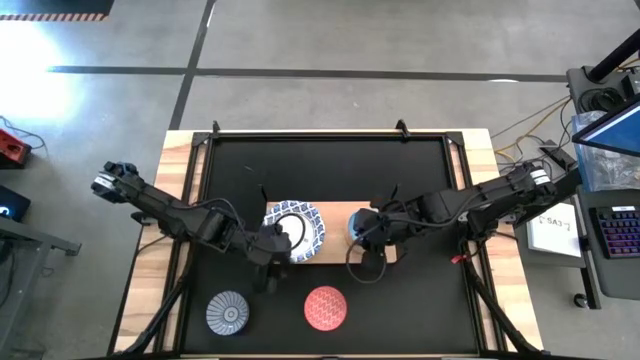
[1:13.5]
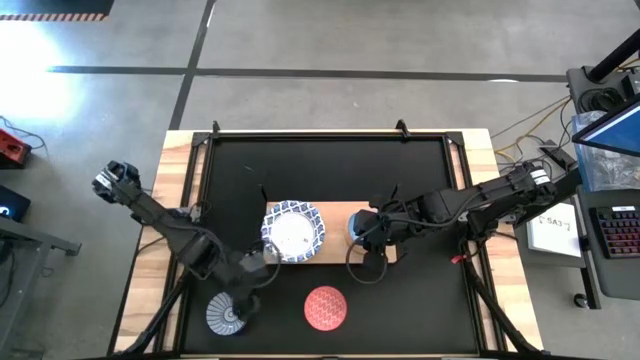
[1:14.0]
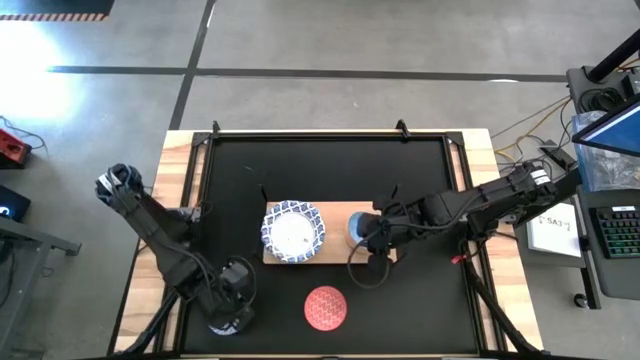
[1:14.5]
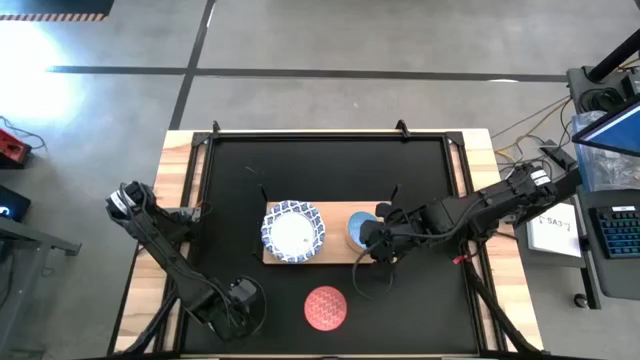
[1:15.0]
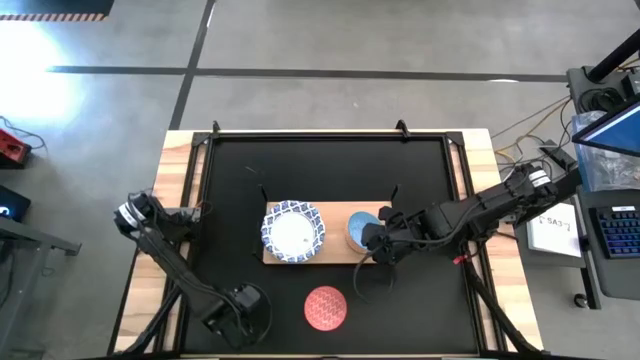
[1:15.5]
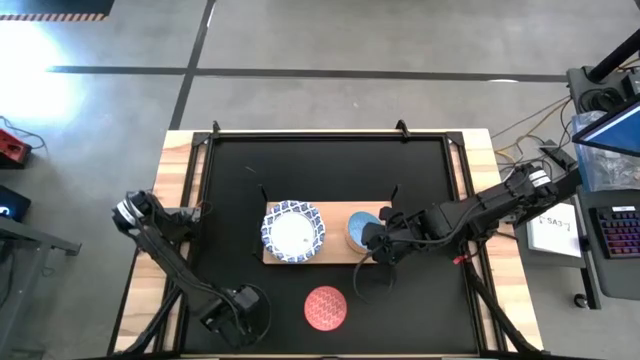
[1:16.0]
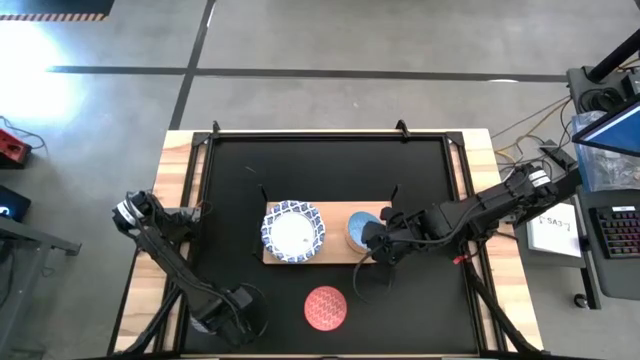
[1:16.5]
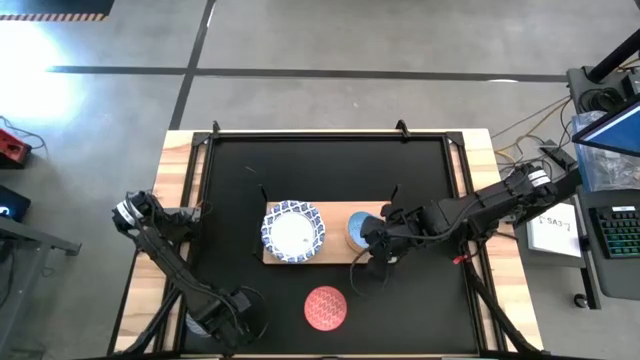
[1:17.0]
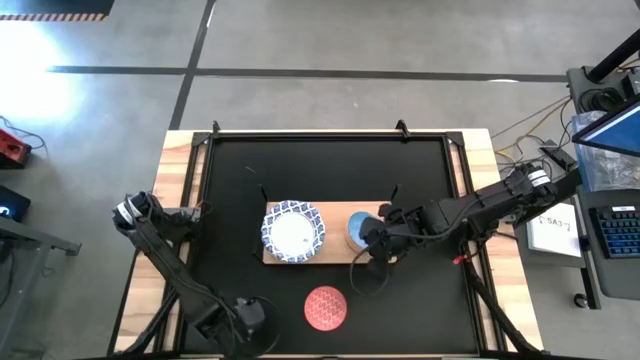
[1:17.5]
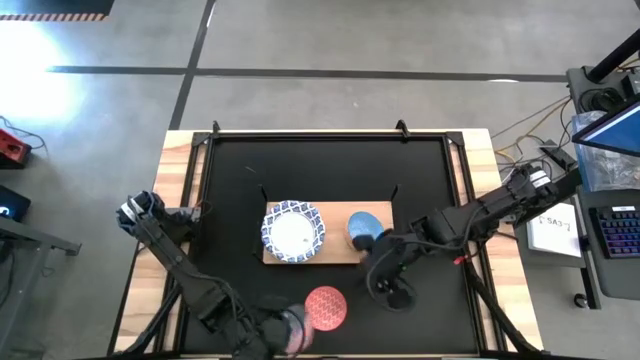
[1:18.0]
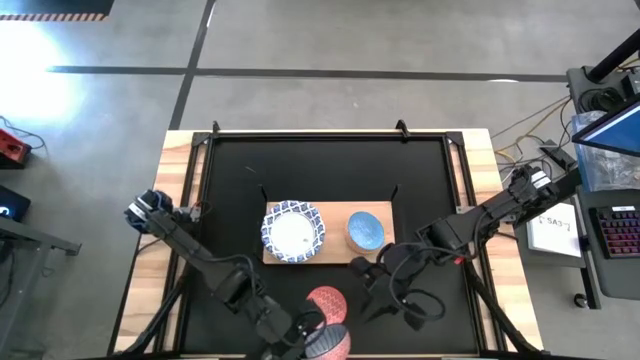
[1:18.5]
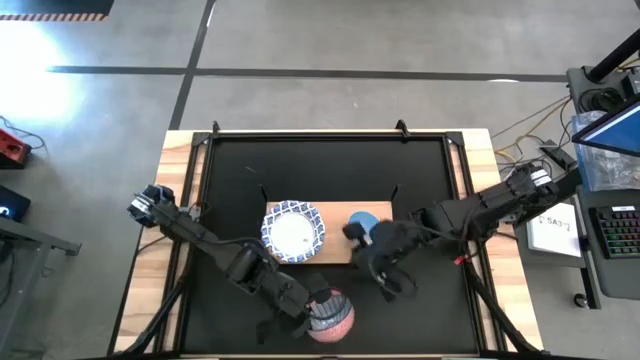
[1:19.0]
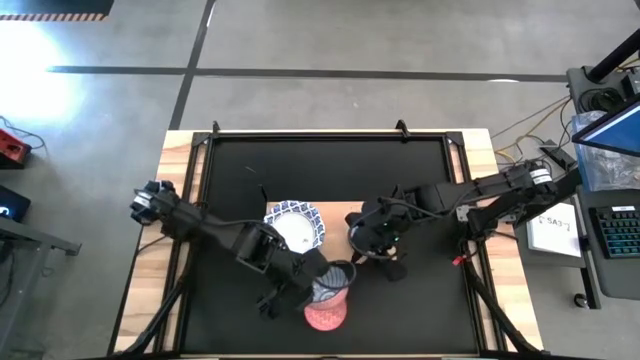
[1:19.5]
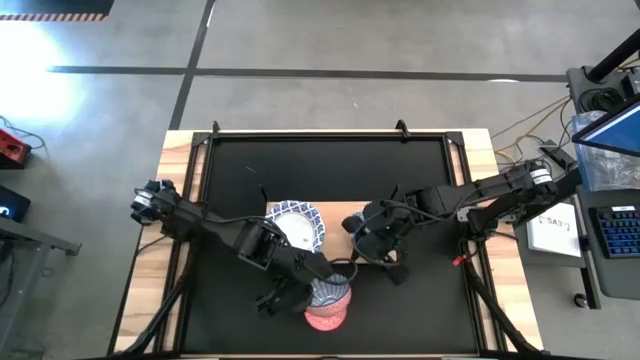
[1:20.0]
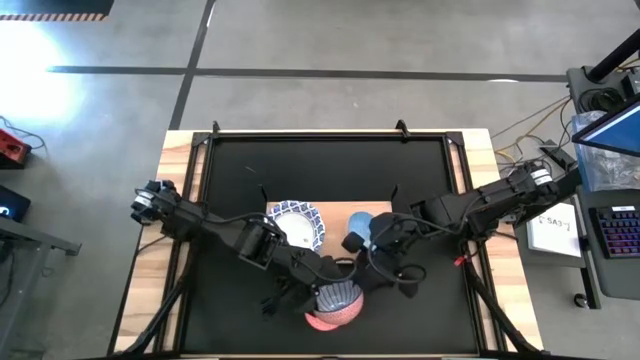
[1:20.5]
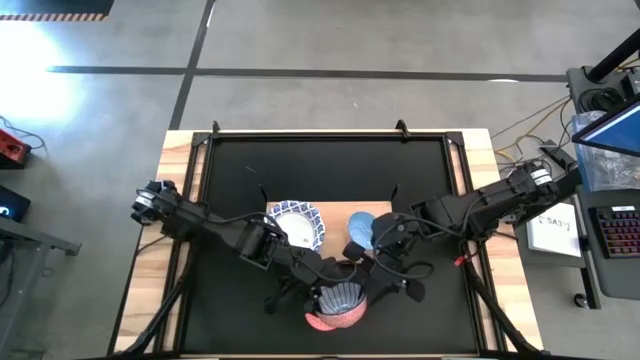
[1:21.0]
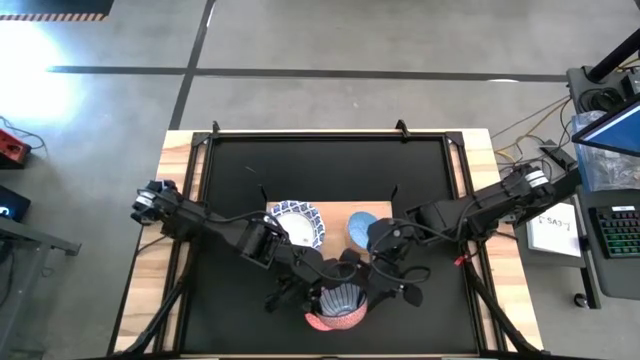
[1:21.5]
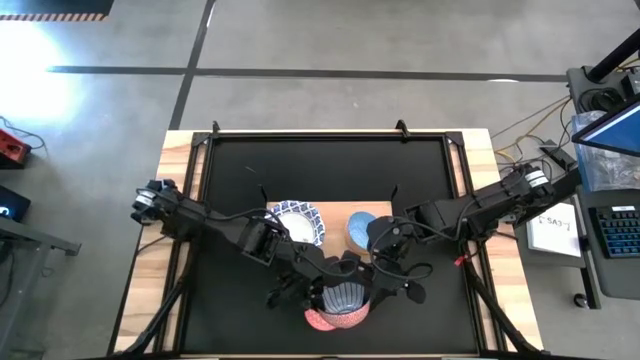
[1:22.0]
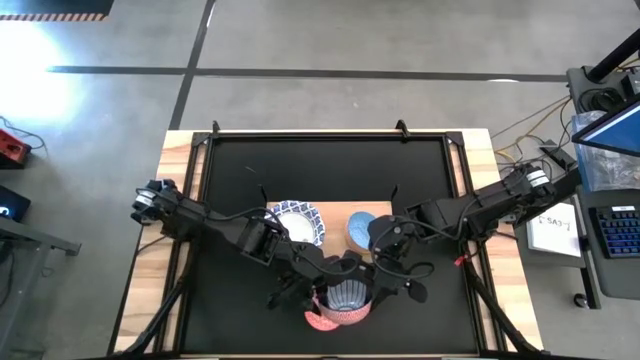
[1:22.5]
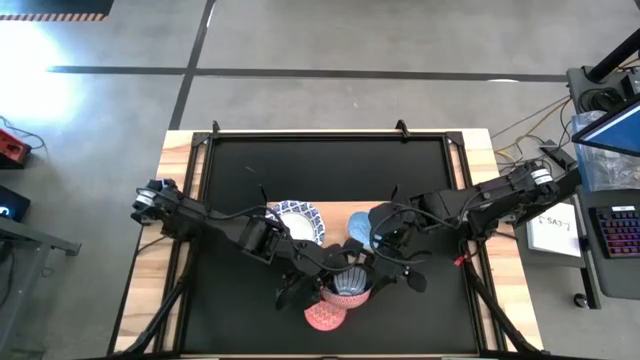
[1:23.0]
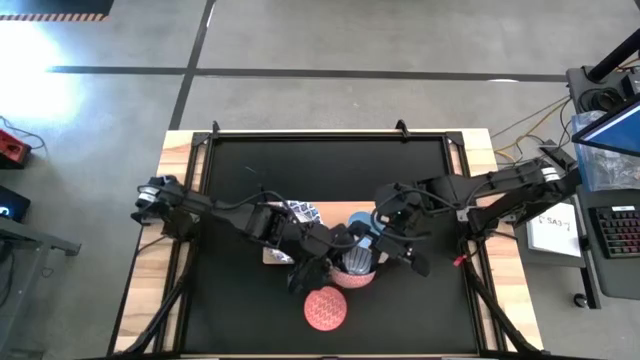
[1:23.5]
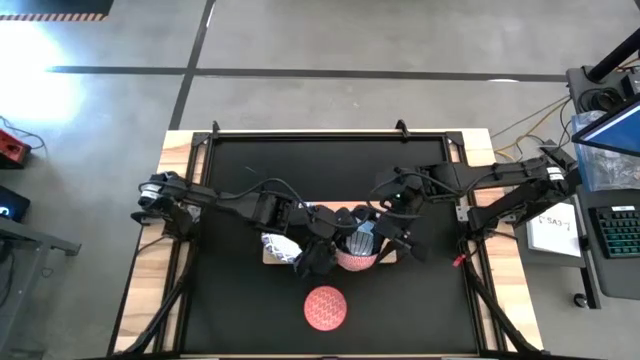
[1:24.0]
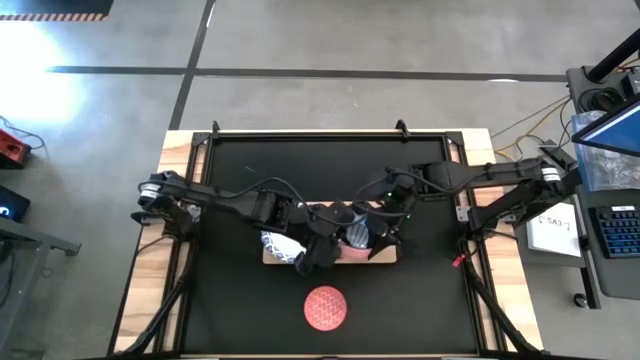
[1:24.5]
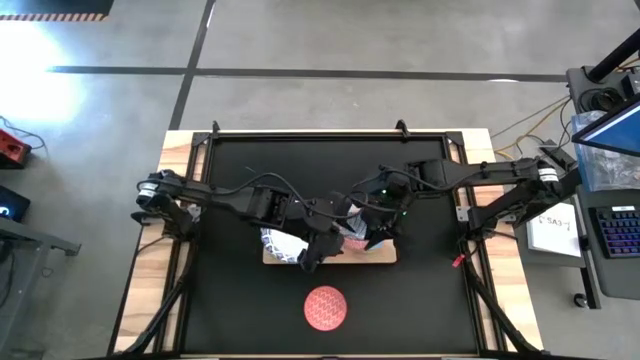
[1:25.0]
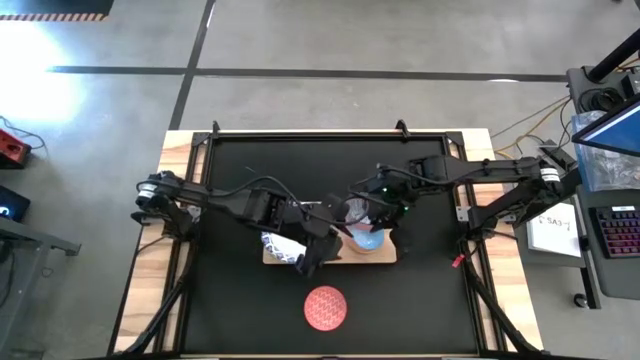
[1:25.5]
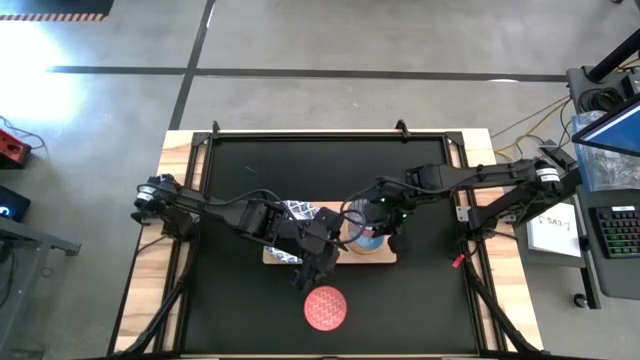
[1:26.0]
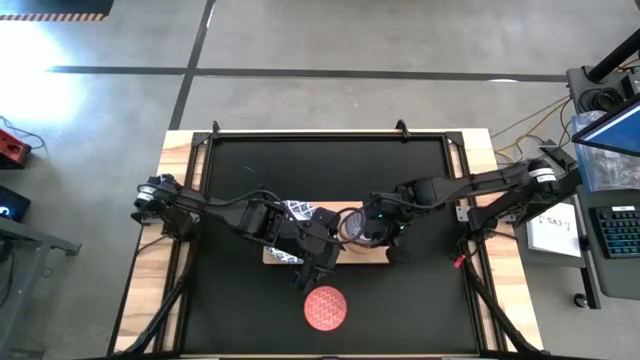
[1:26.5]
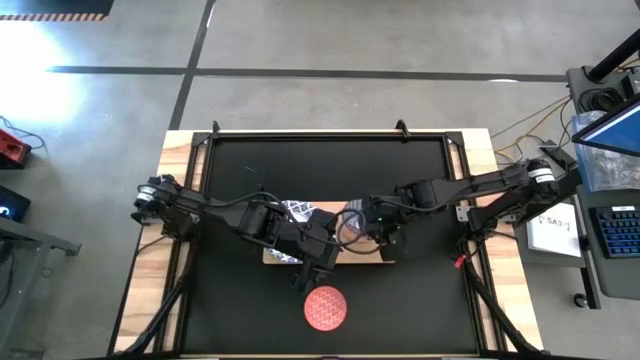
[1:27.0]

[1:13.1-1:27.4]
Task: Place and stack bowls onto a shelf
Stack the dark blue patterned bowl on top of the light blue patterned bowl on the shelf

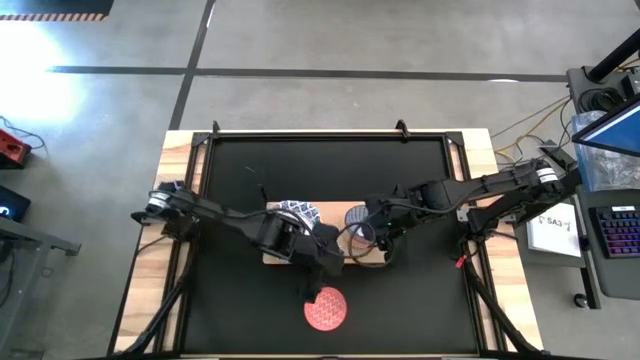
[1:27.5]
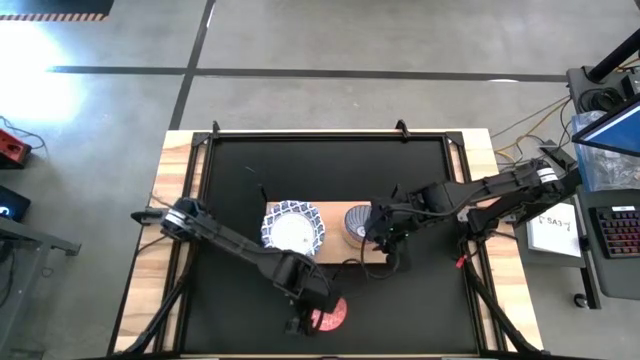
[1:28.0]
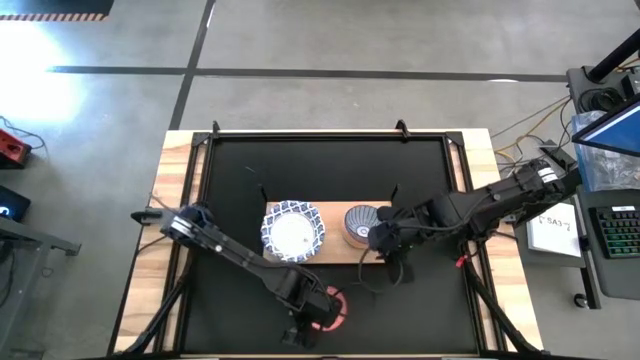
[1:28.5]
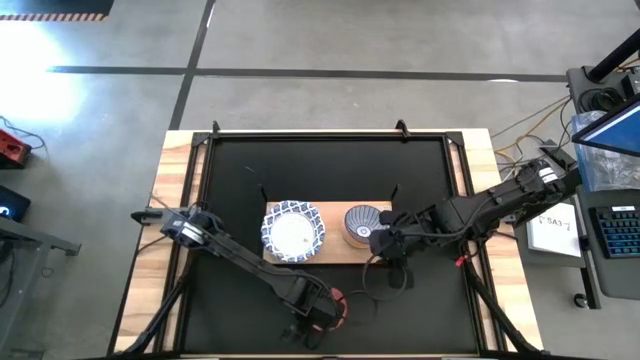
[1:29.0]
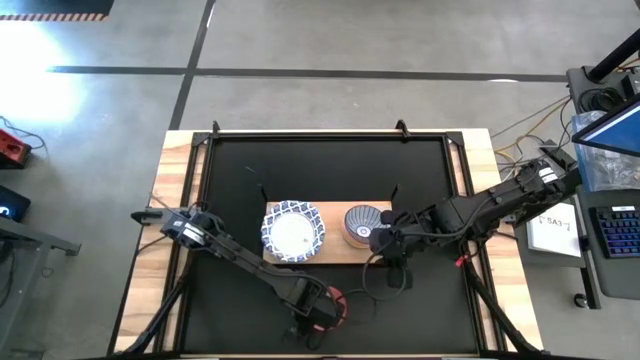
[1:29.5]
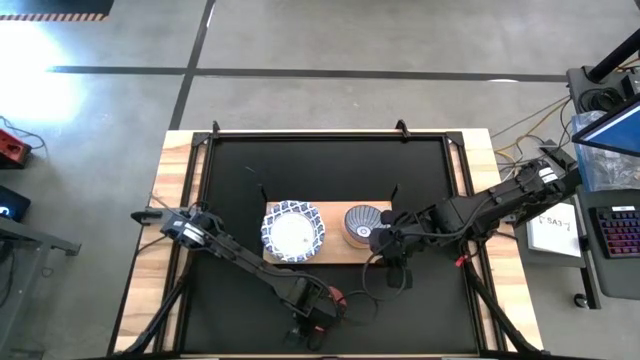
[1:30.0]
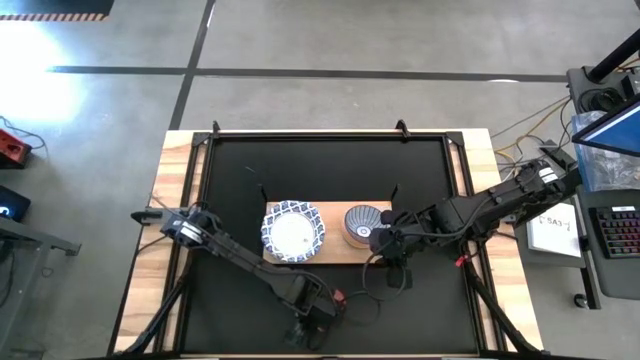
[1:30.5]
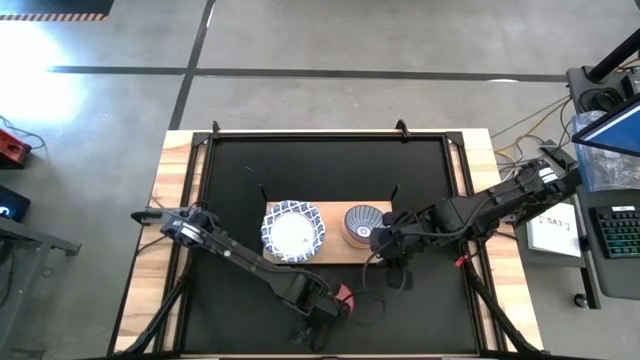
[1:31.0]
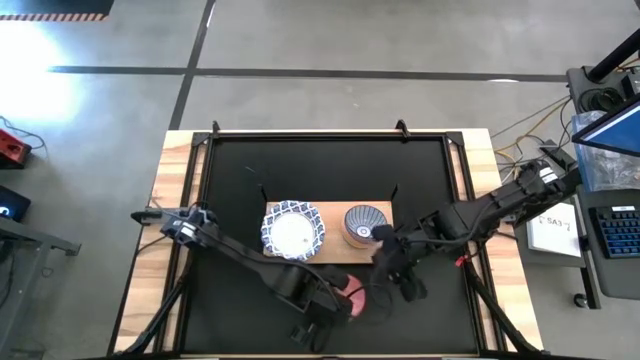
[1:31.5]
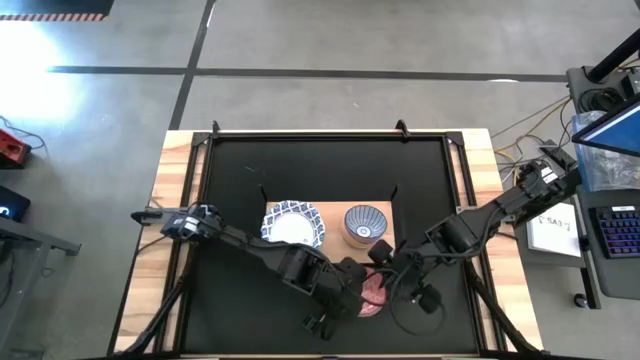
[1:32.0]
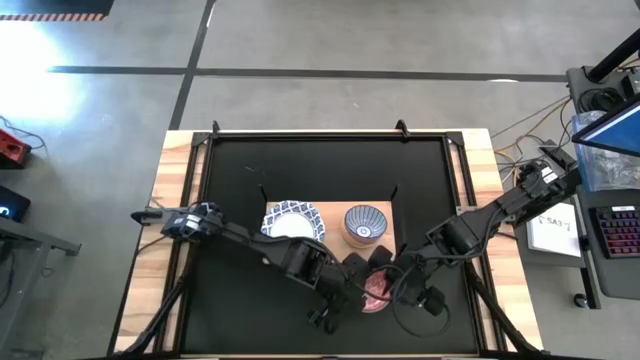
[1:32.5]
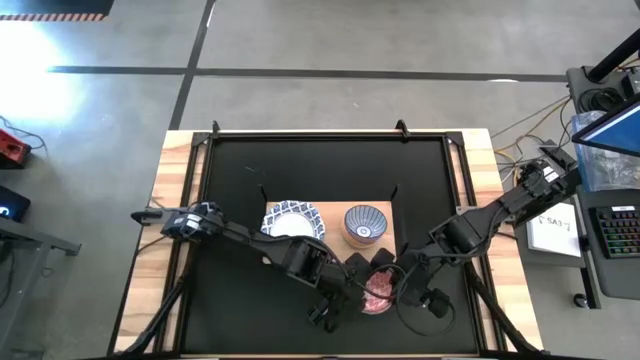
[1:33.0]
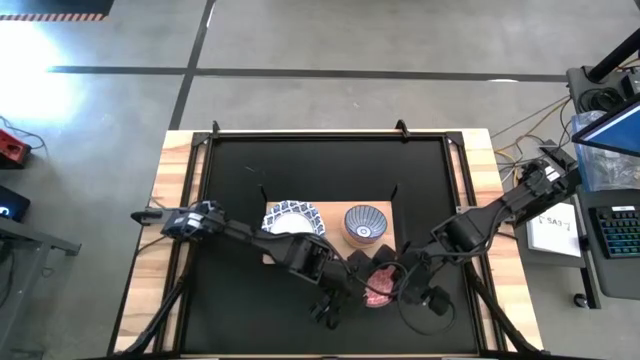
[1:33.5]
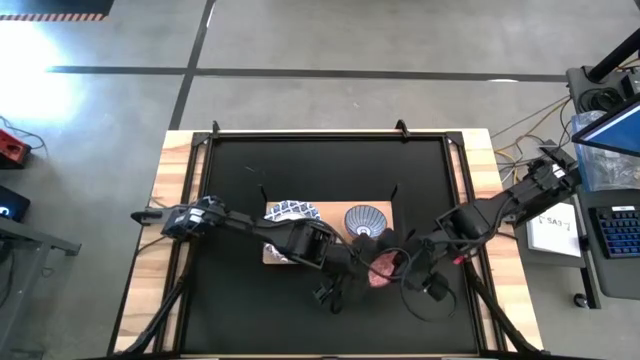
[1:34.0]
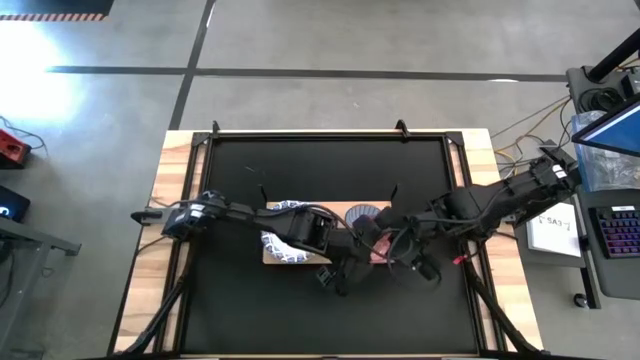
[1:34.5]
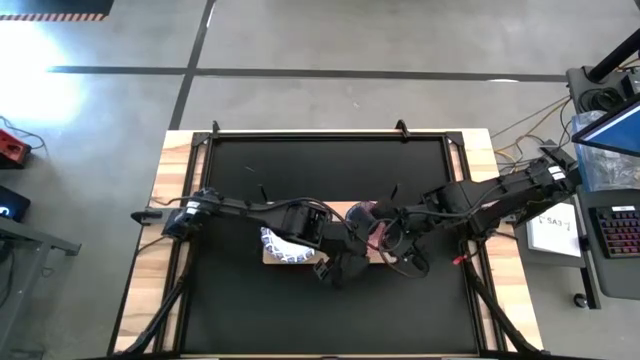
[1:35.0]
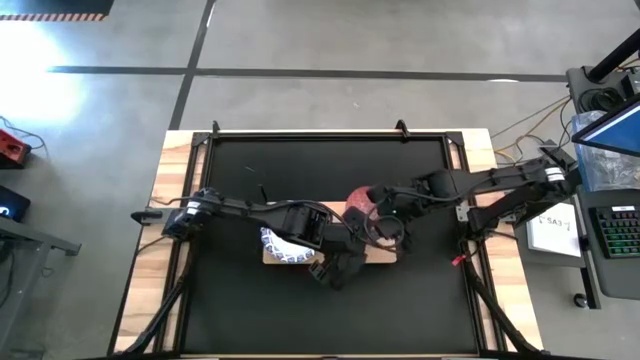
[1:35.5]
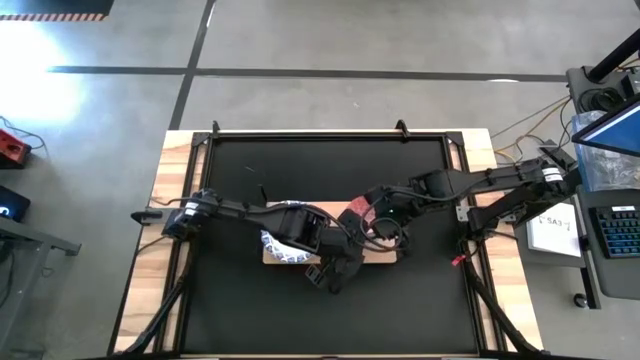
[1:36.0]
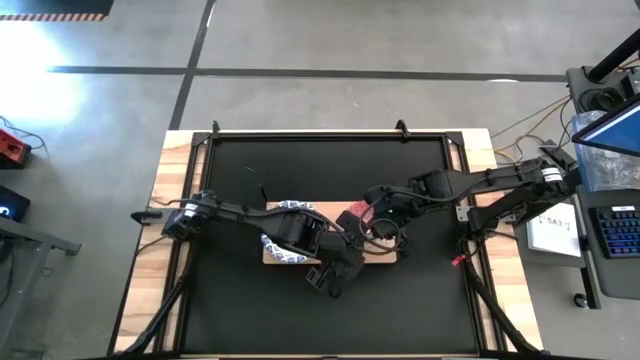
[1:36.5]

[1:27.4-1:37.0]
Stack the pink patterned bowl on top of the dark blue patterned bowl on the shelf
